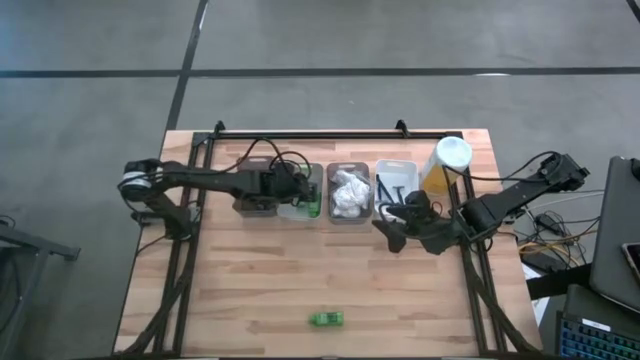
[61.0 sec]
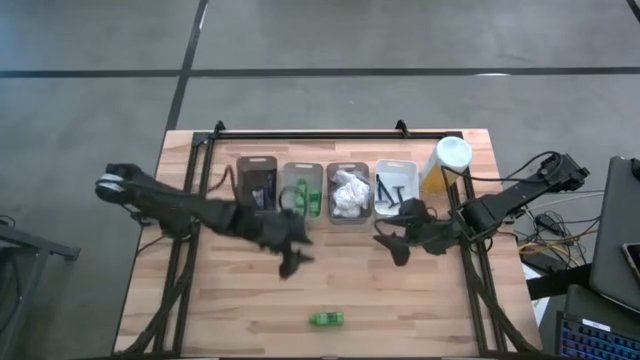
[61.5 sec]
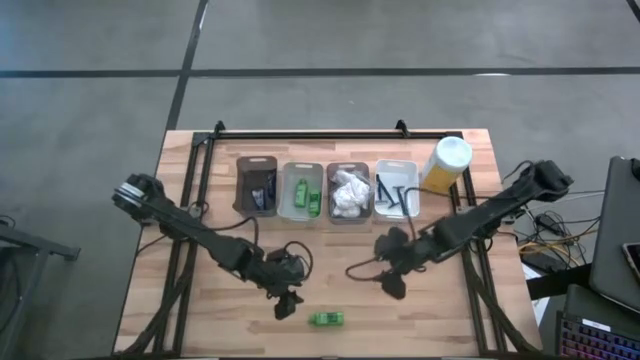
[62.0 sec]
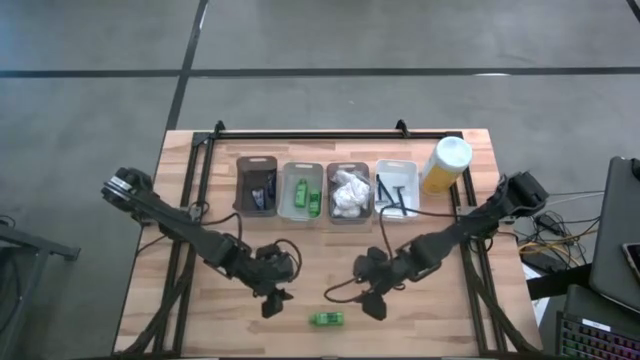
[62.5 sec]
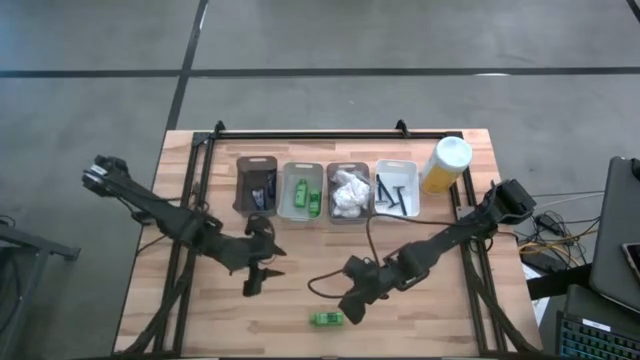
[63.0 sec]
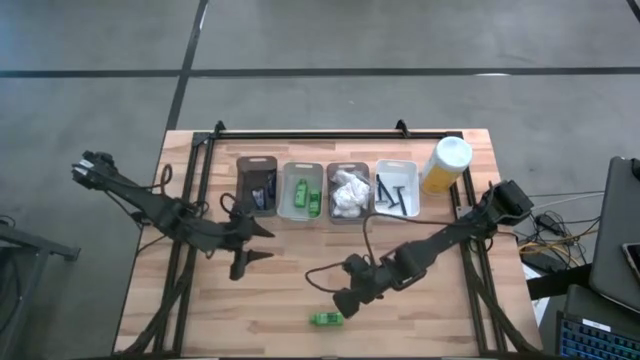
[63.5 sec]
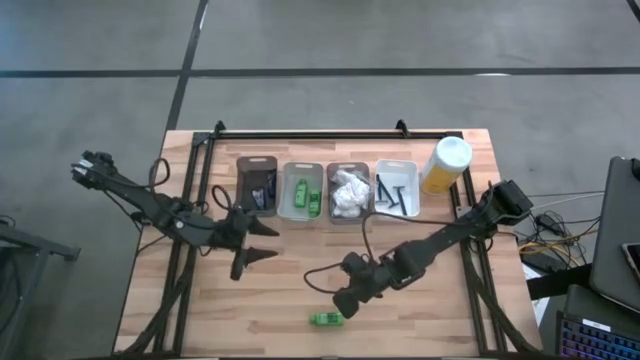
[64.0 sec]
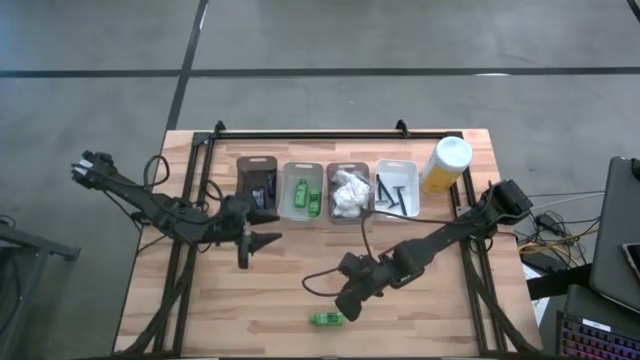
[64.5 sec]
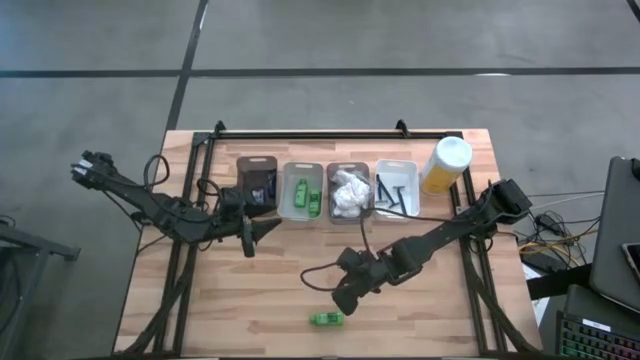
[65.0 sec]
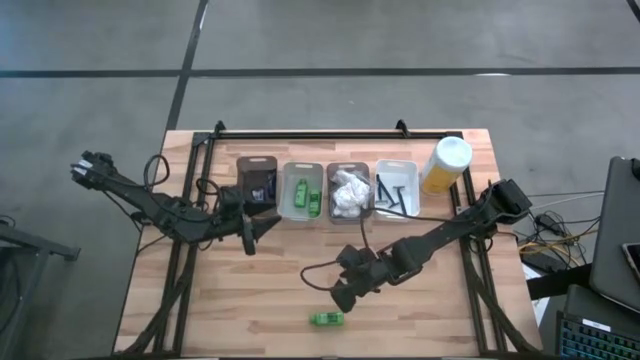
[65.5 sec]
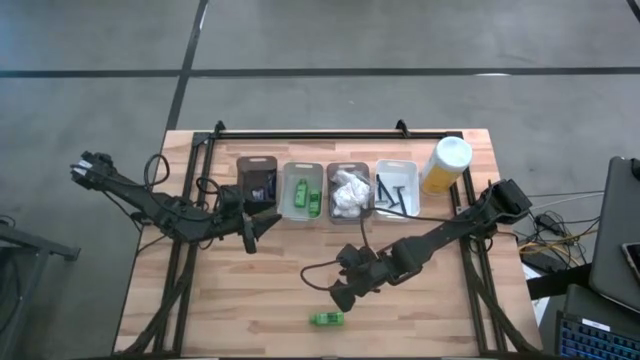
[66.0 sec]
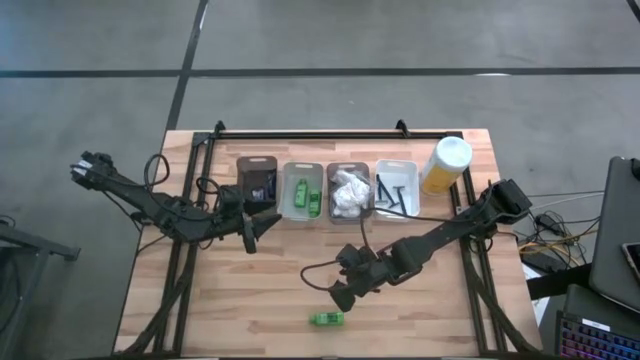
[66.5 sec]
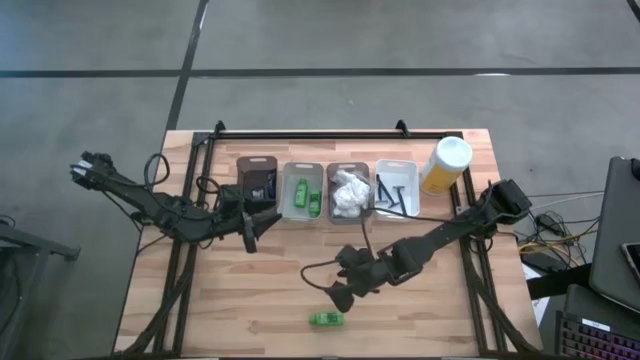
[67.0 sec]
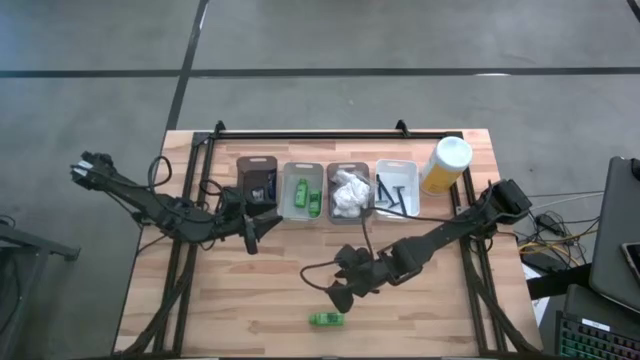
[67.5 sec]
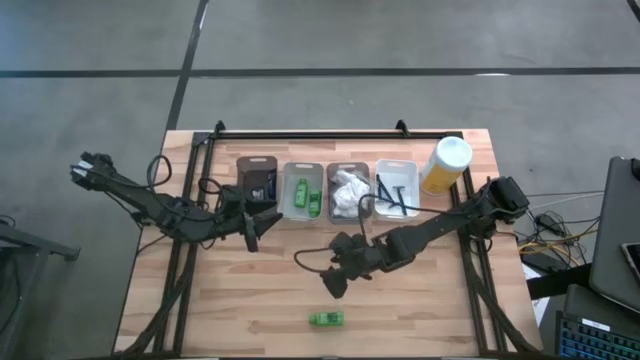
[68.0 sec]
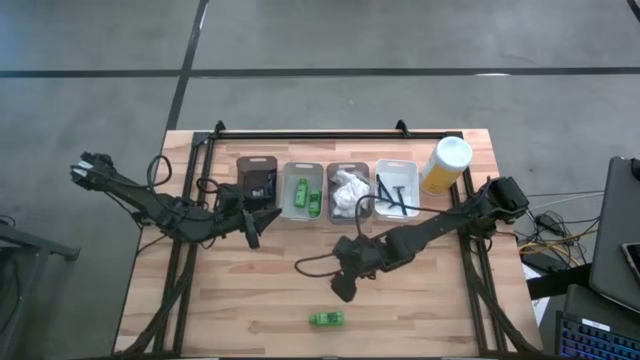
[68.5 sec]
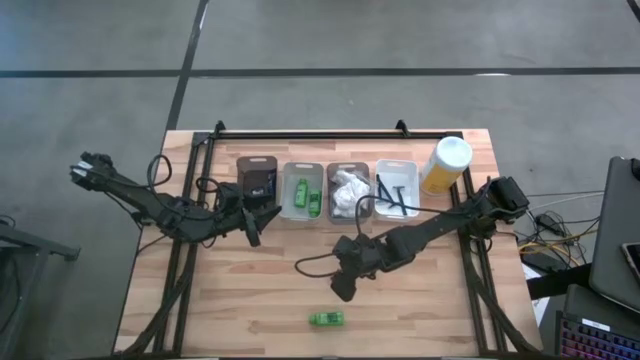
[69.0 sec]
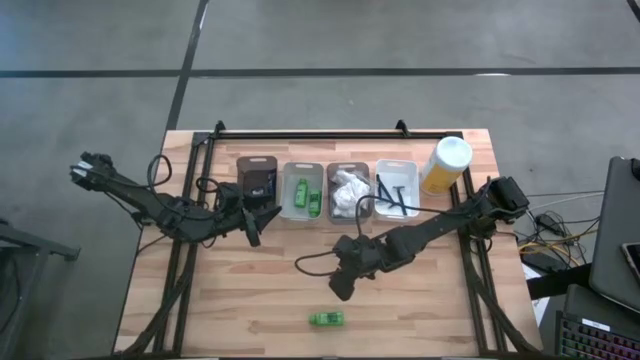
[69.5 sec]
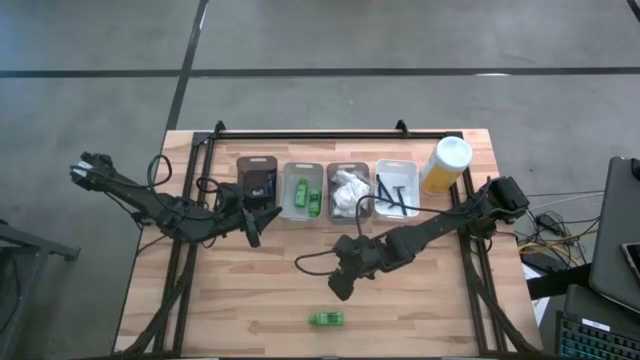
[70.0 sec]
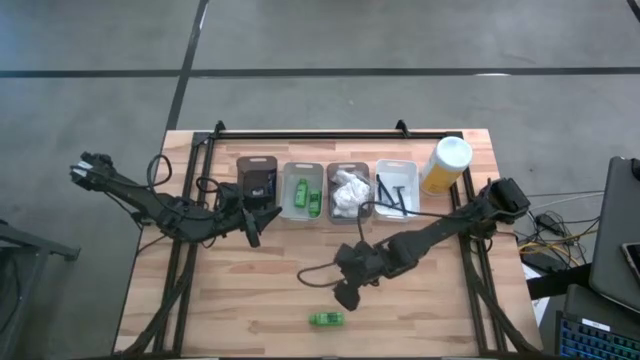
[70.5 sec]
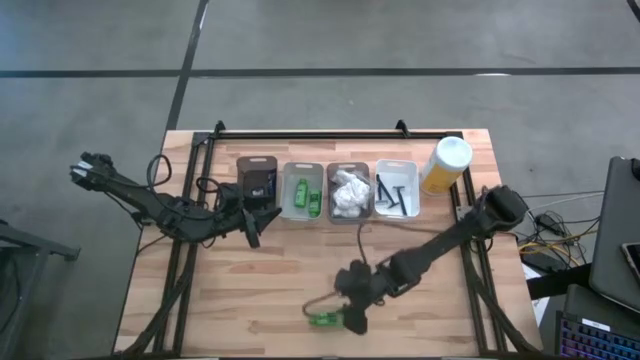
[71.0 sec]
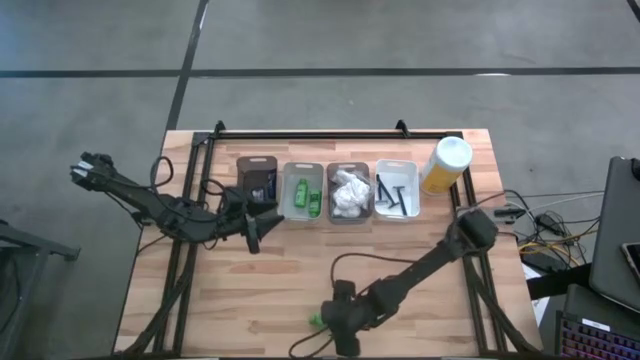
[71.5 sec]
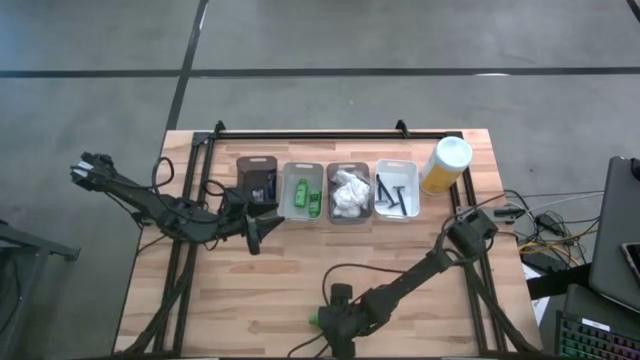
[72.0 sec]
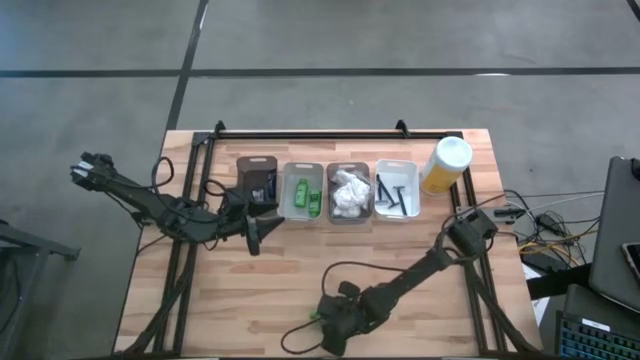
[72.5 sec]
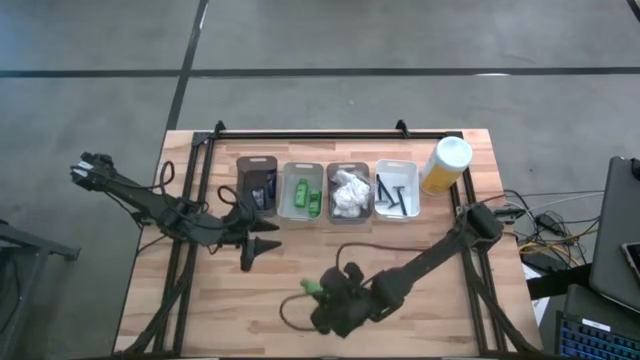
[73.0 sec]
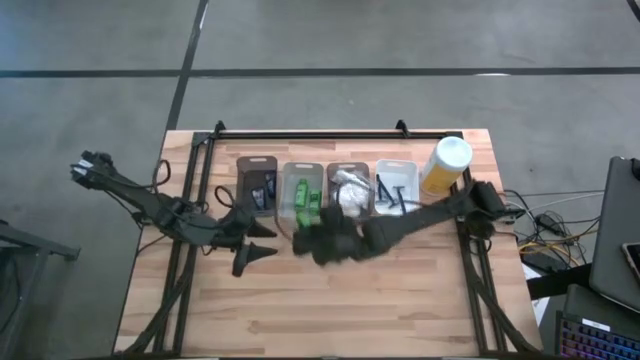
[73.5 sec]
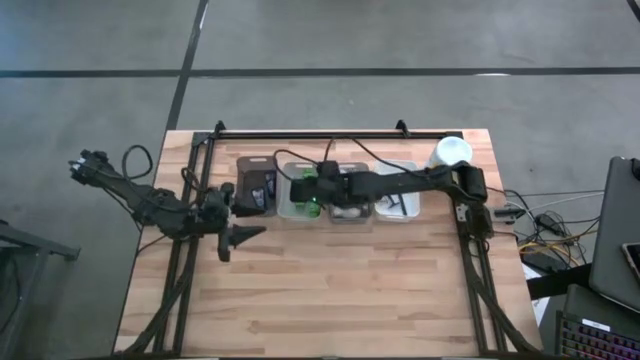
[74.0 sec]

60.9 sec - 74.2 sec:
Task: Pick & Place Travel size toiletries
Put the green shampoo into the gray bin

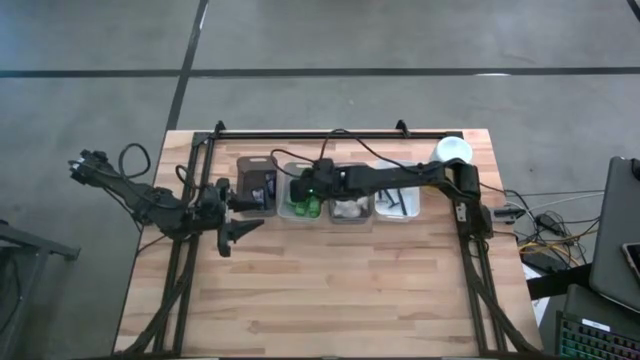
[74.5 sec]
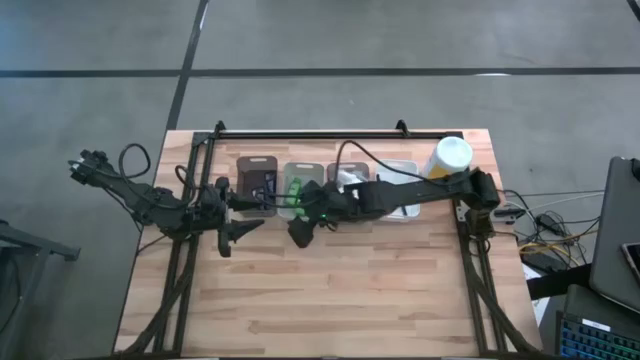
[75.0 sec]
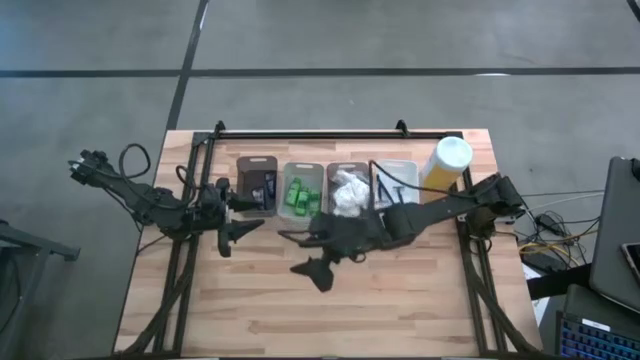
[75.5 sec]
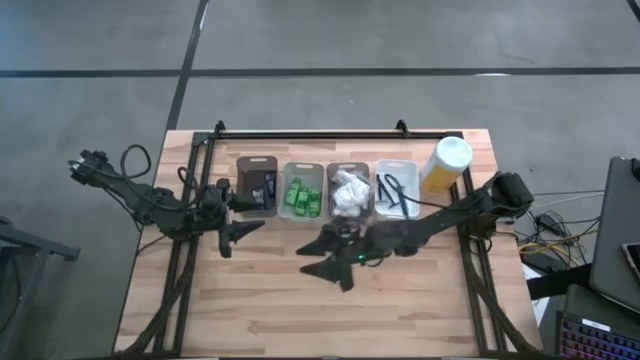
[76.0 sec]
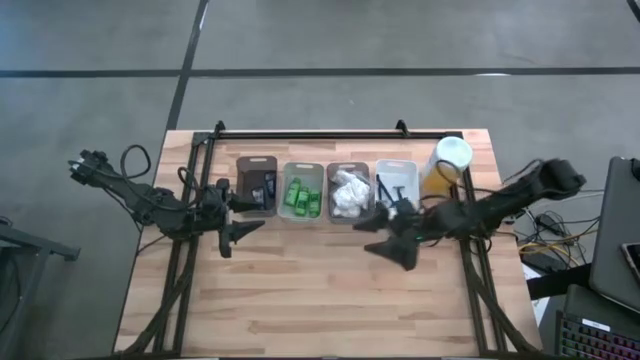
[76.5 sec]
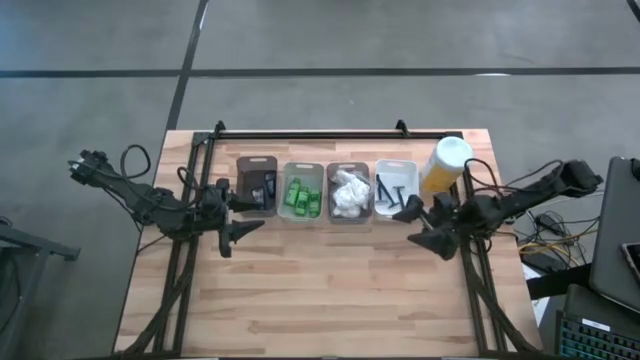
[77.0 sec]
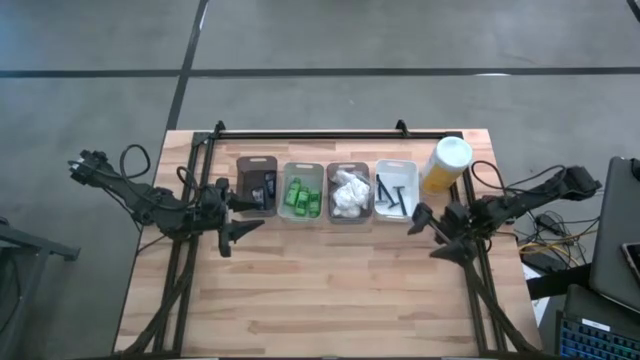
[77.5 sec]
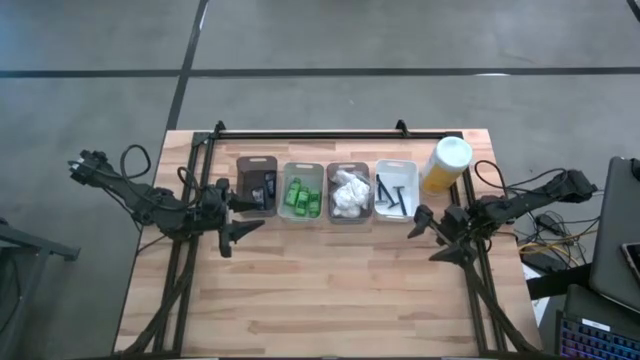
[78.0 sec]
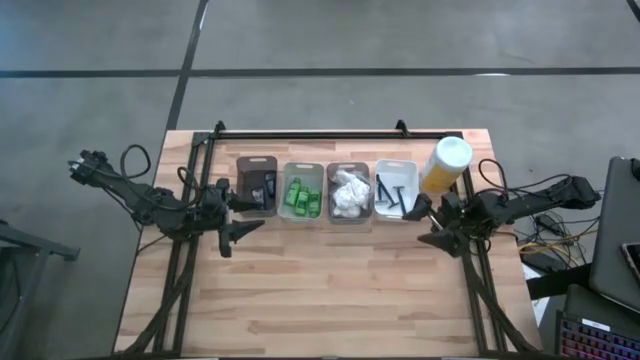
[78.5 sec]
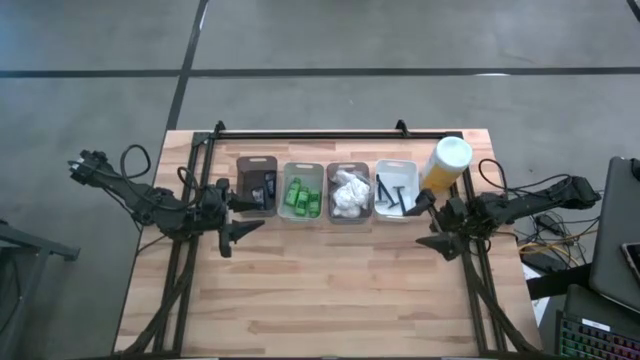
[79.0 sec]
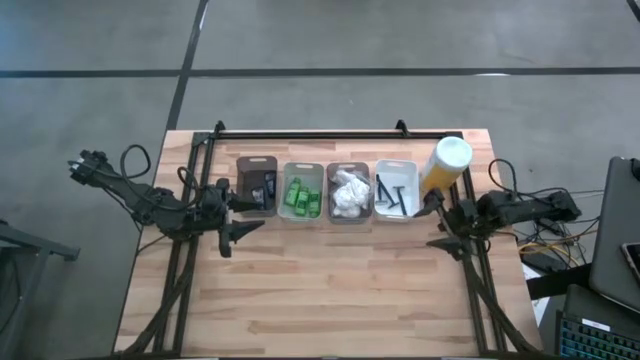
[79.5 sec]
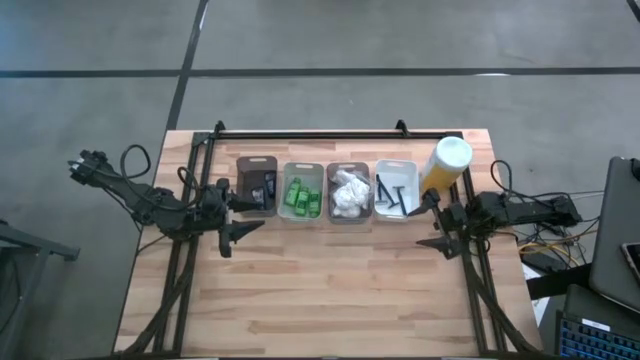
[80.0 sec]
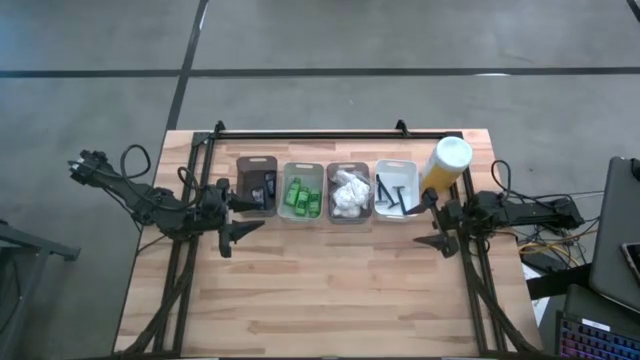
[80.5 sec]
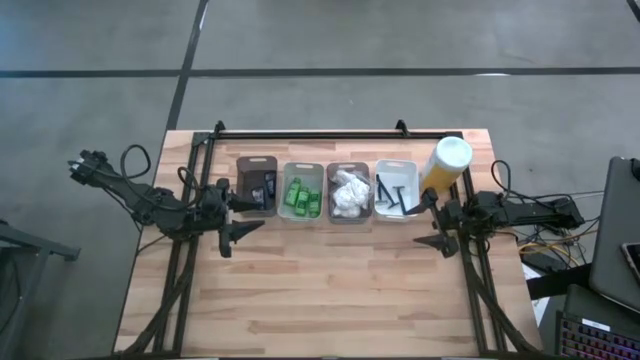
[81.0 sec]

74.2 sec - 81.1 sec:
Return to Home Position
